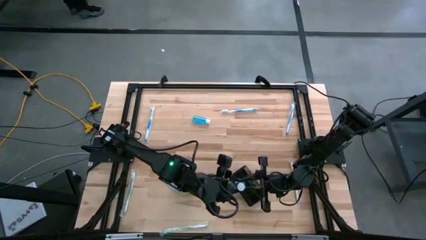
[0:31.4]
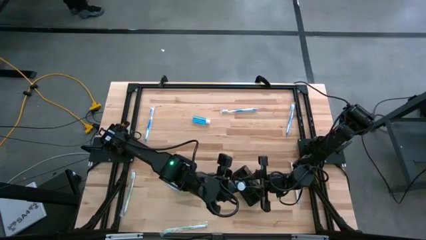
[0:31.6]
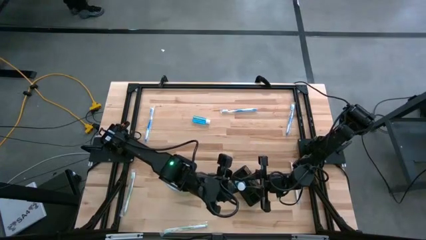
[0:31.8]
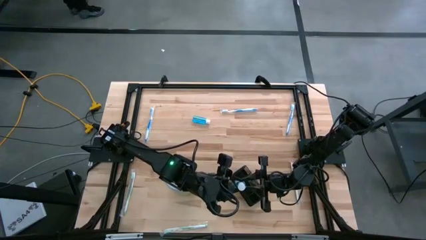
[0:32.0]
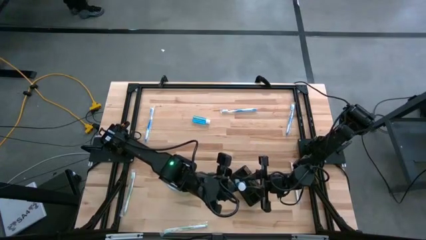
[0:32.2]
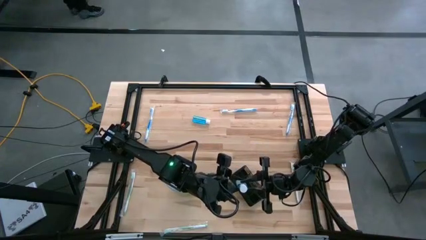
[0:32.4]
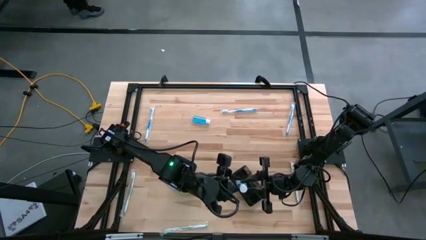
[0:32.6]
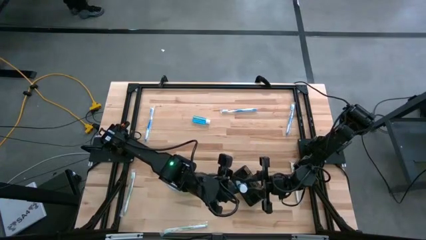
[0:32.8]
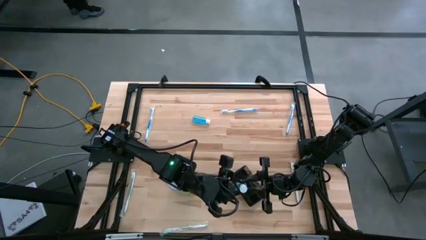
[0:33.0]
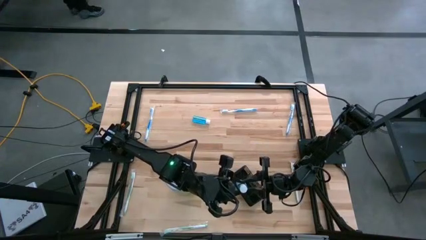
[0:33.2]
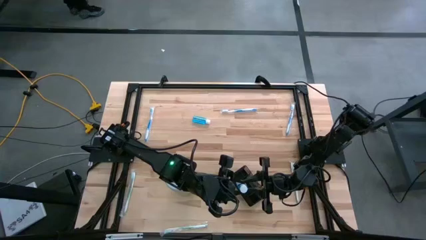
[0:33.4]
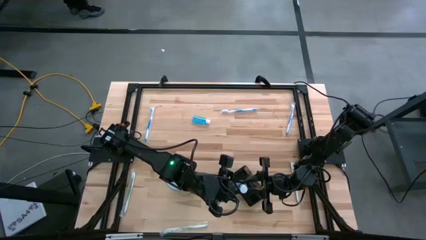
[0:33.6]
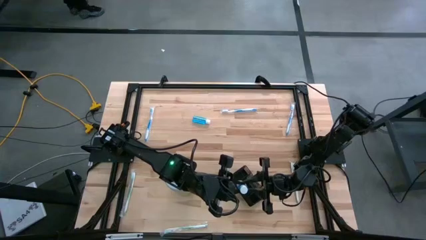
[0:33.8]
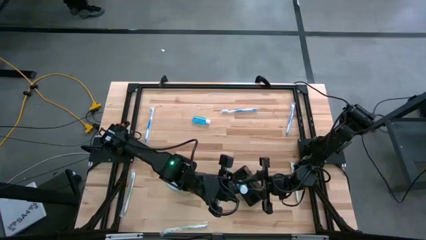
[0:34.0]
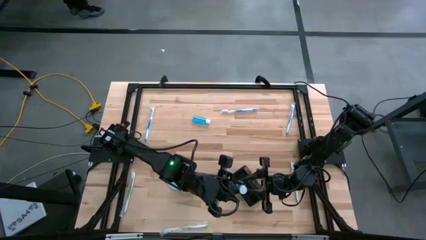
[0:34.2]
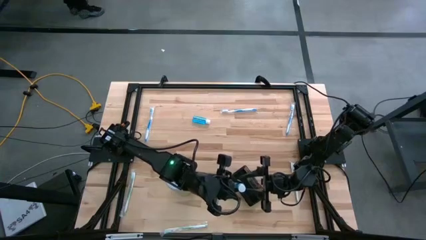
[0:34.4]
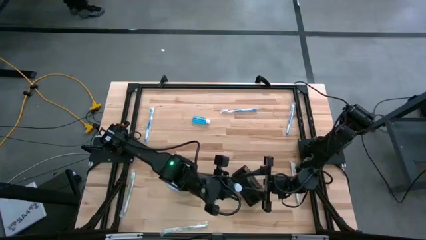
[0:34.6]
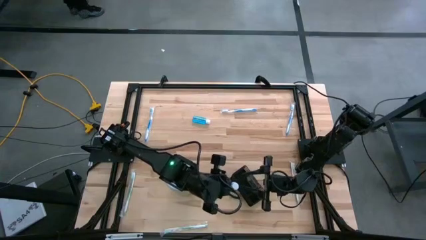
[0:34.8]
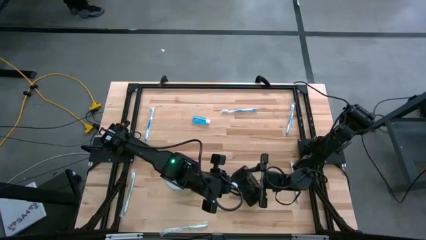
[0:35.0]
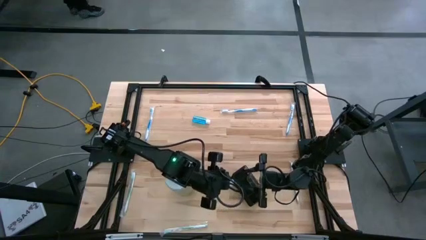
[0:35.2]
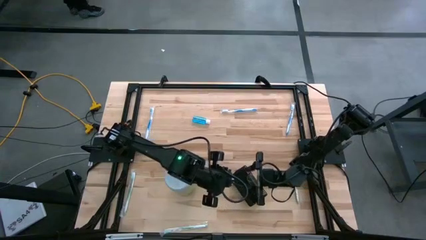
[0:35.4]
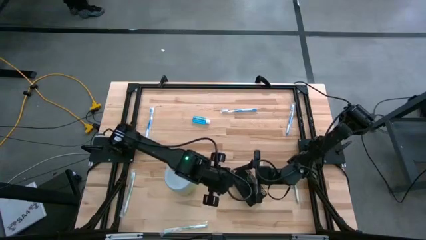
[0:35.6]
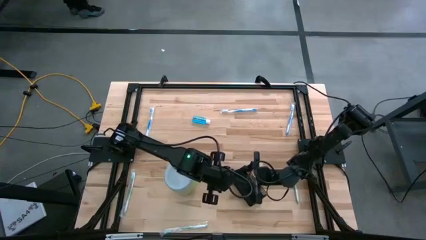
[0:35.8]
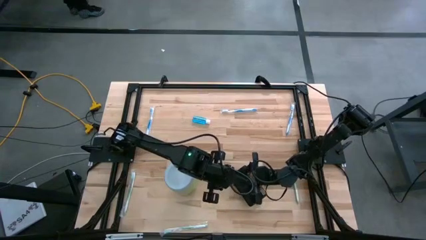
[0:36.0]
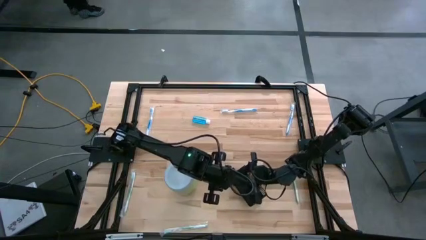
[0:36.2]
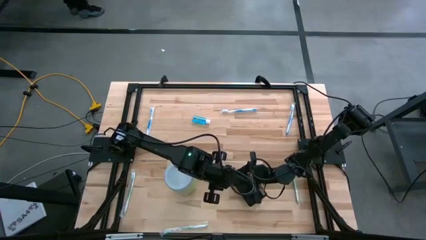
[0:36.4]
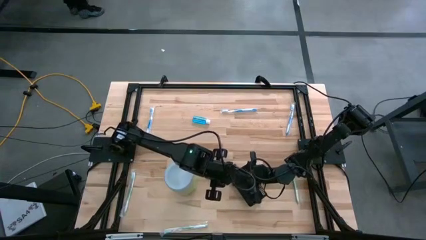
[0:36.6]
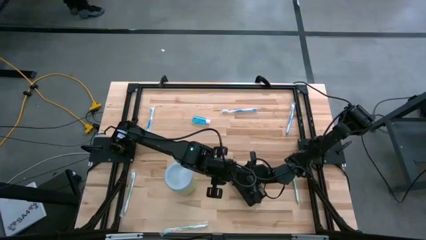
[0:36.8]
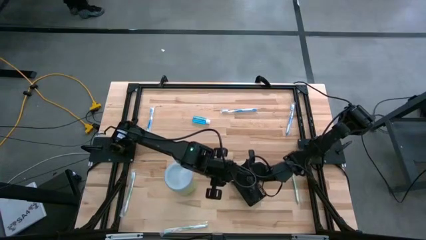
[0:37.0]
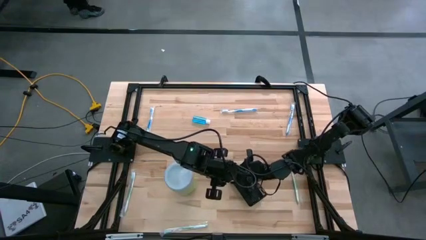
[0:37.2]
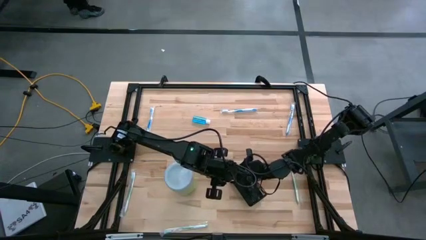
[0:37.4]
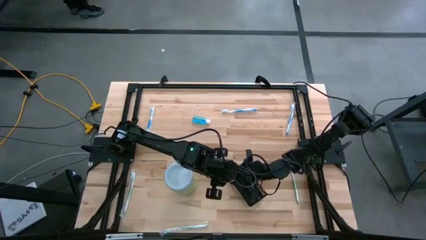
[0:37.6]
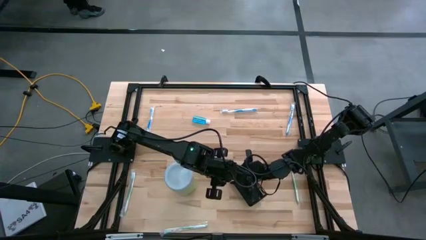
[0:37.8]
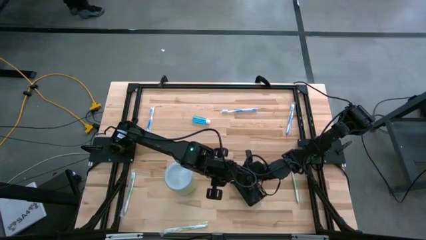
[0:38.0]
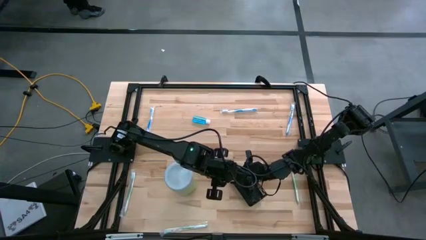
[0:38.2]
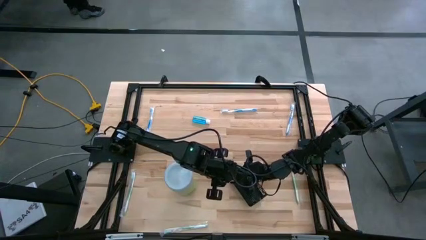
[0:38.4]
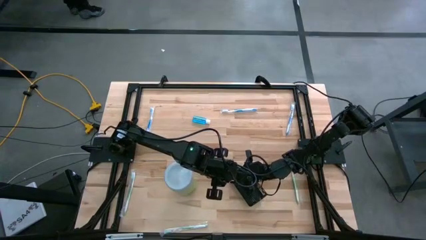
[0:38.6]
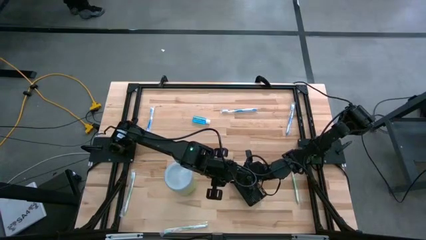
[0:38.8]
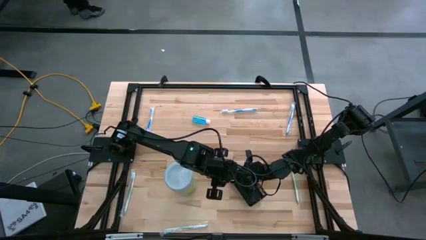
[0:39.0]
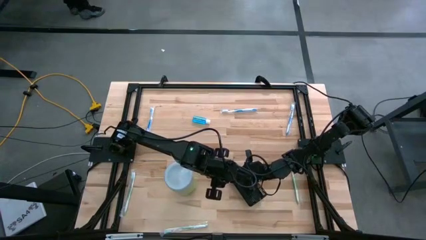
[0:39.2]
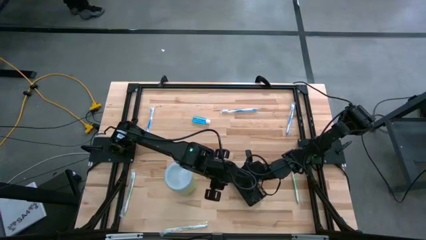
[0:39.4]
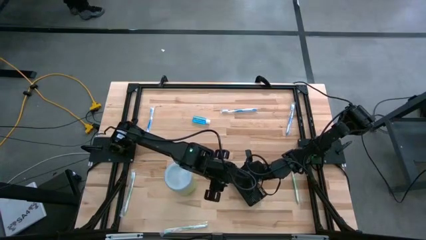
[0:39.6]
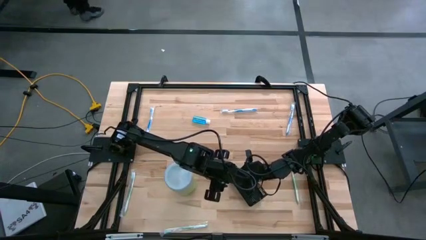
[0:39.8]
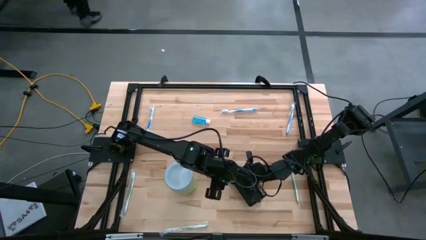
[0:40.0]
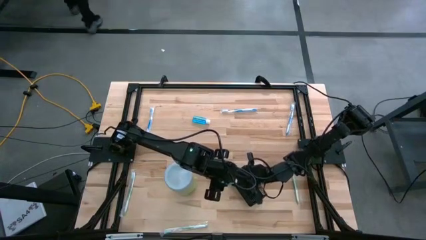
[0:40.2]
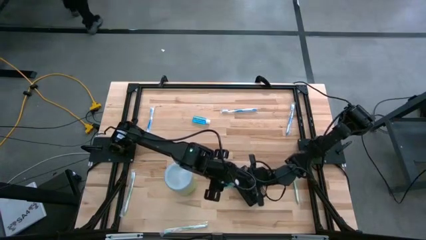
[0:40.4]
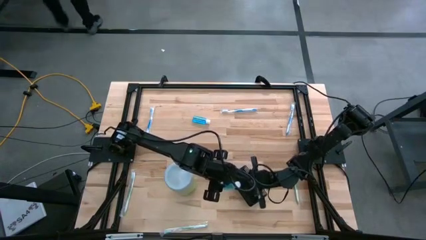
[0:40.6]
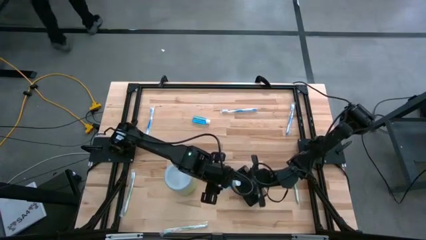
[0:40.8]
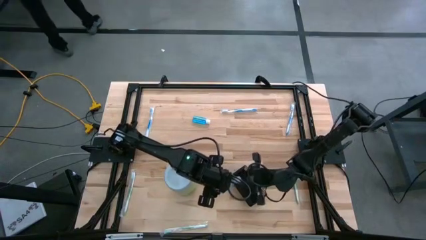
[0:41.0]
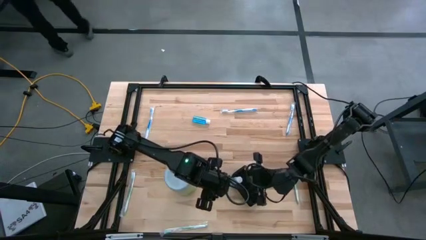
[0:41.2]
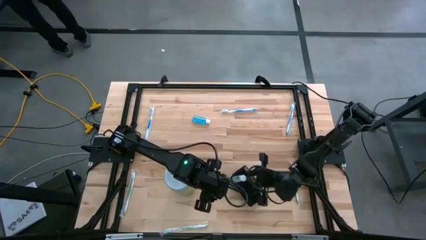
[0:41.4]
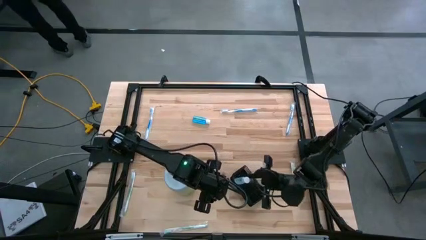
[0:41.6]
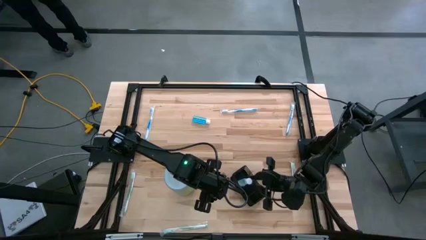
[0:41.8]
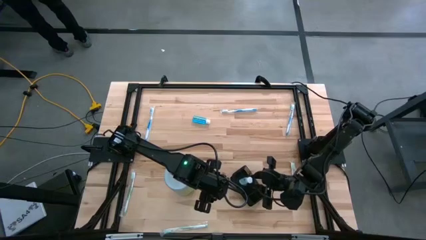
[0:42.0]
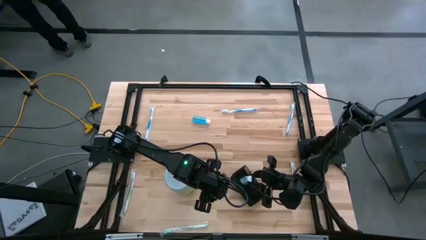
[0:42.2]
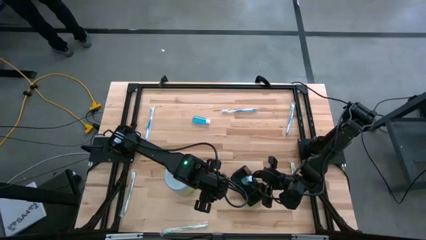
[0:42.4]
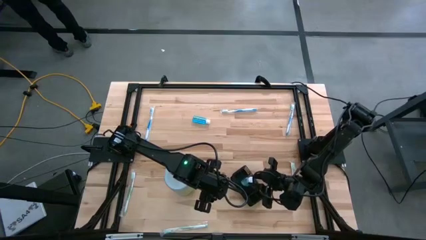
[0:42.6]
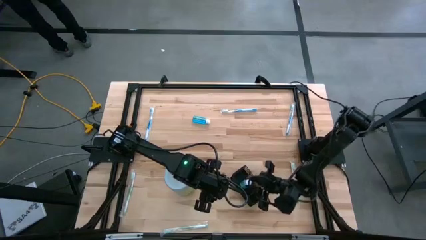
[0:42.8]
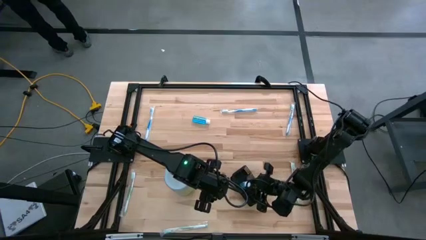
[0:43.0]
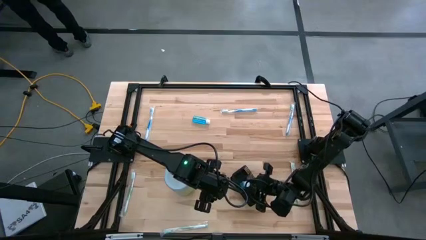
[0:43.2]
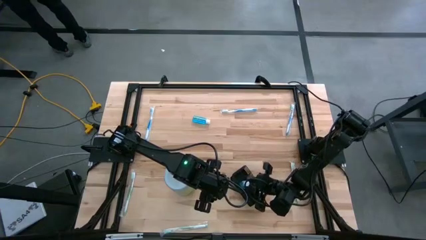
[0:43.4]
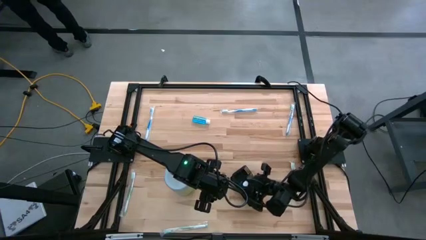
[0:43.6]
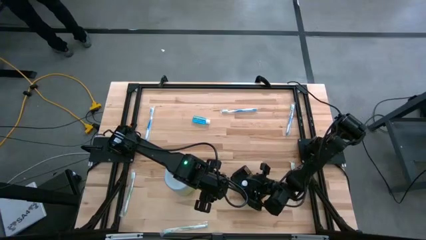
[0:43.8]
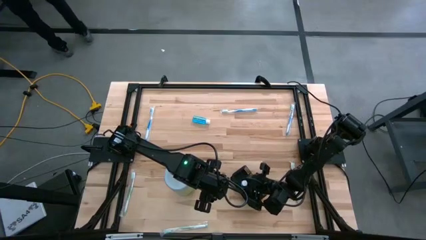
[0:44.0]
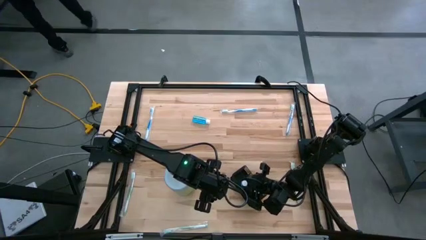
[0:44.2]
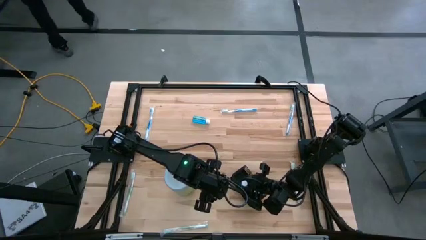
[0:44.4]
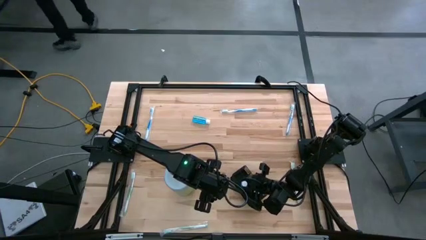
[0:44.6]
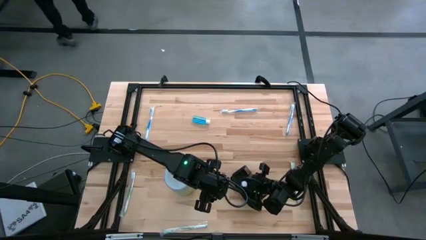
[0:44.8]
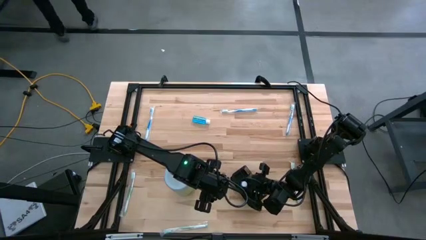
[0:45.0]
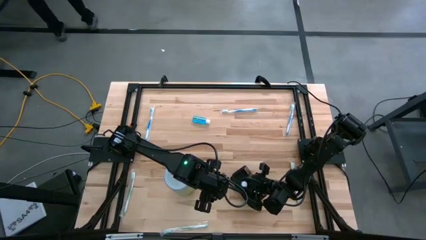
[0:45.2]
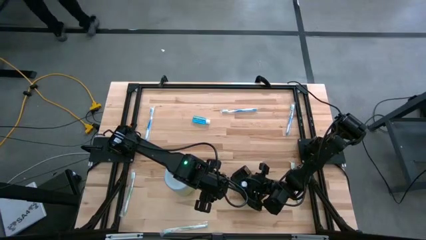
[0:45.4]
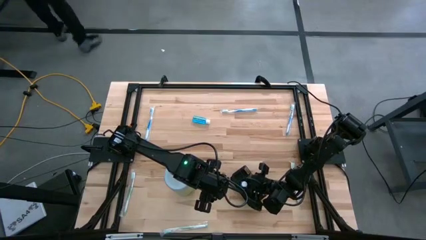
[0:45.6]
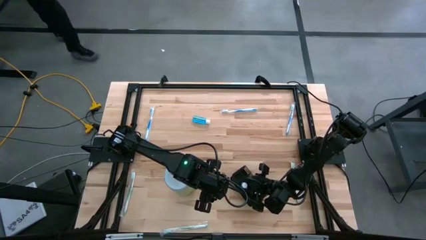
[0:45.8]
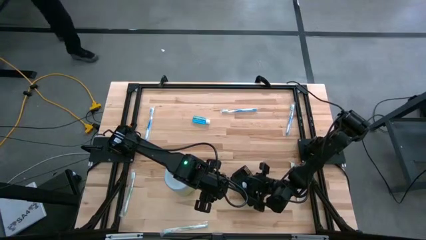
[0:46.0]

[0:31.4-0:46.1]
Task: Pick & Place toothbrushing station
Put the bottom blue mouthwash into the black mesh organizer

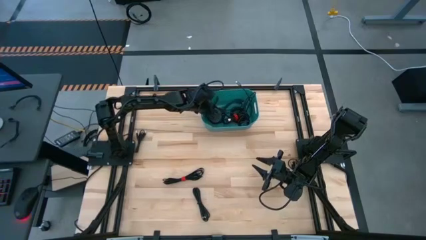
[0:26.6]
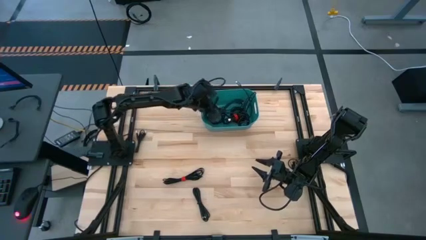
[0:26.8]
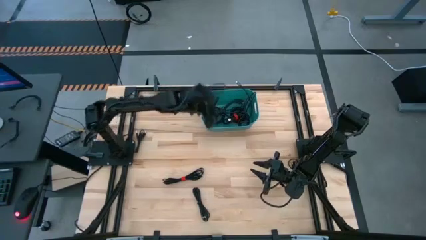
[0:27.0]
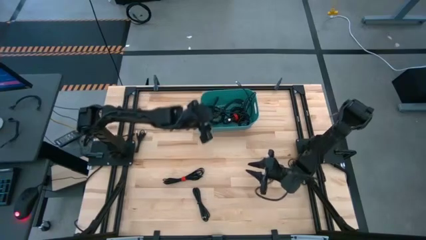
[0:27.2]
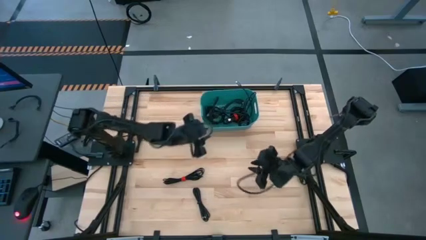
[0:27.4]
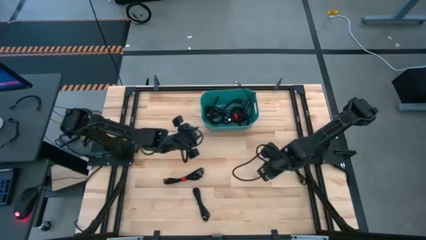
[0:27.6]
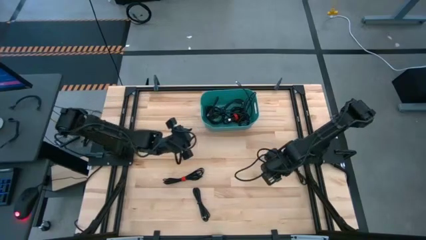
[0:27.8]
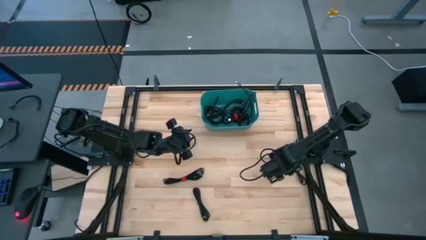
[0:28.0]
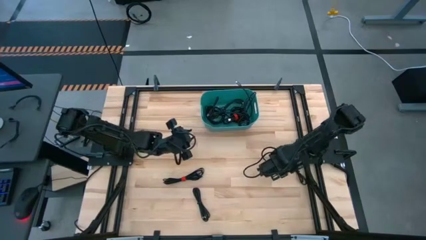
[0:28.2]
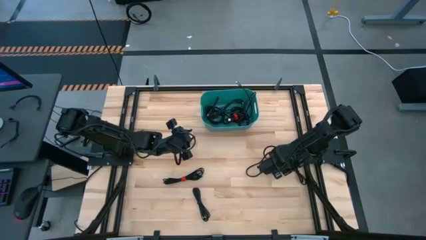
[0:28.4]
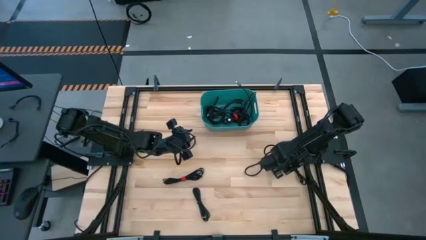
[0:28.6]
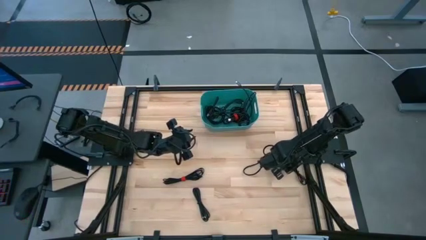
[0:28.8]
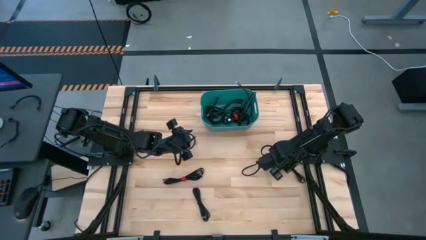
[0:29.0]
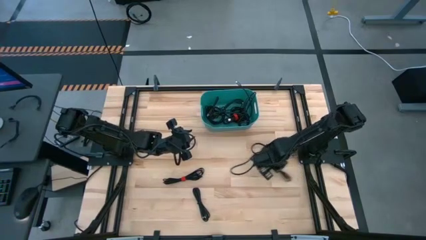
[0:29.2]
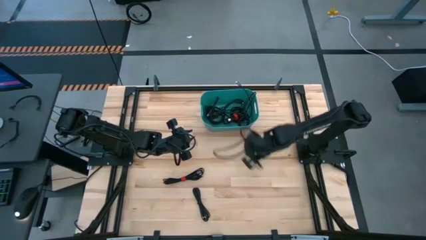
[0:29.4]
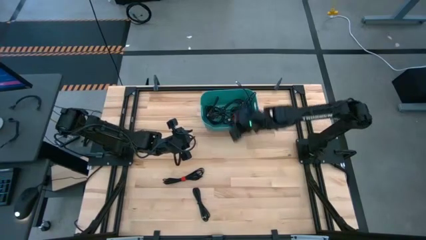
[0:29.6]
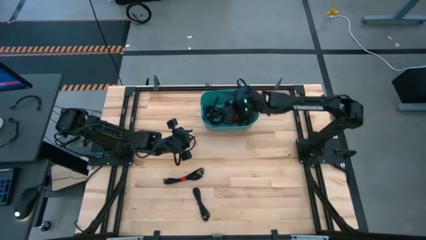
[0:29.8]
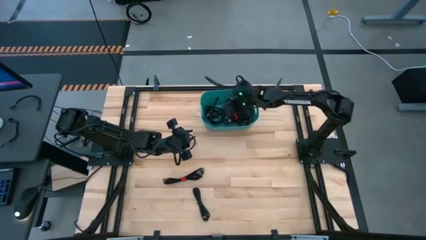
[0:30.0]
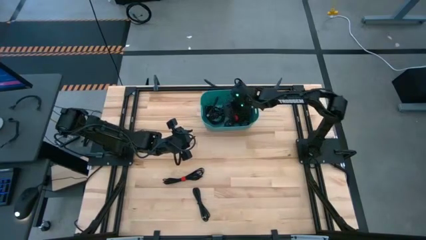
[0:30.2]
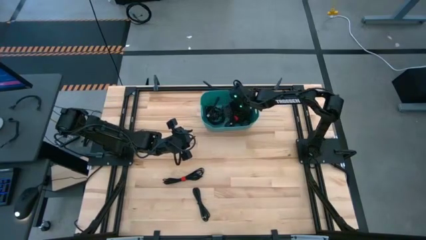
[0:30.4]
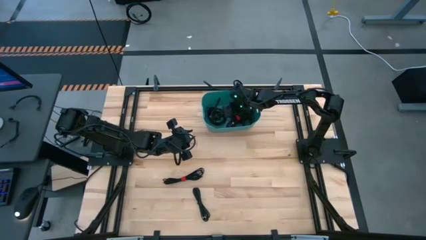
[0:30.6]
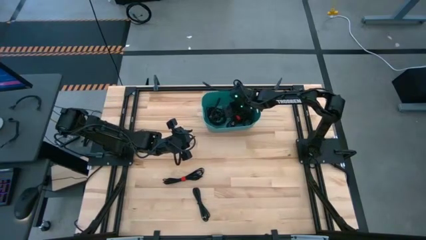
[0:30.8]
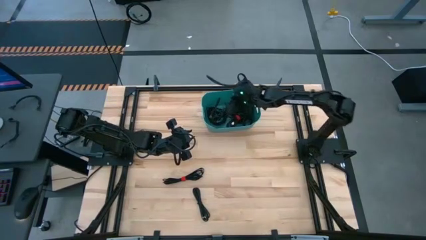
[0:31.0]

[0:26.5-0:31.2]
Task: Pick and place USB-C Cables
Put the black charger cable into the blue bin
